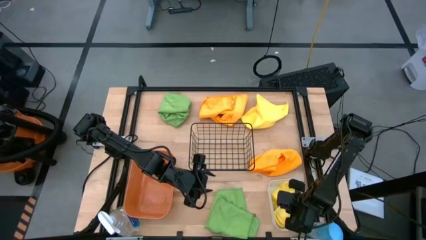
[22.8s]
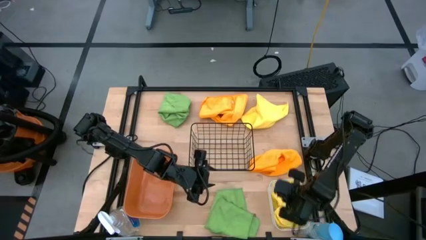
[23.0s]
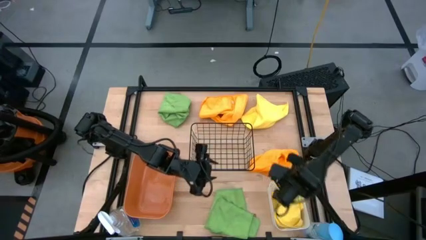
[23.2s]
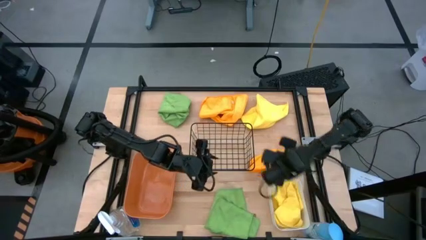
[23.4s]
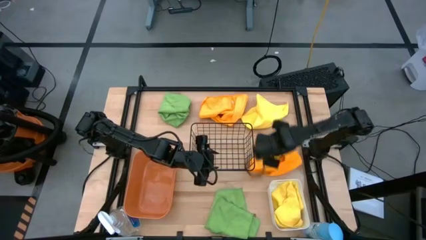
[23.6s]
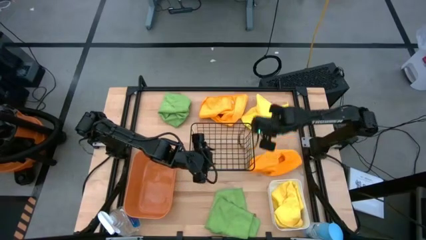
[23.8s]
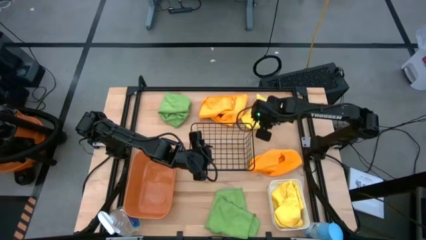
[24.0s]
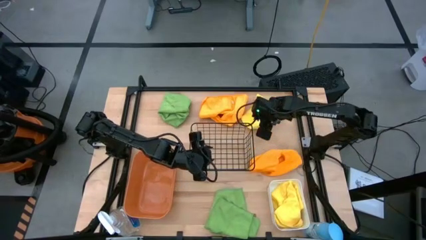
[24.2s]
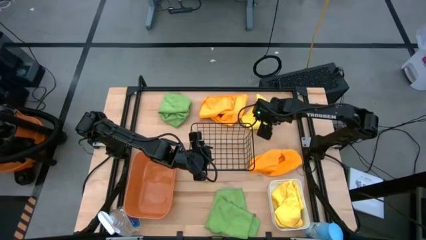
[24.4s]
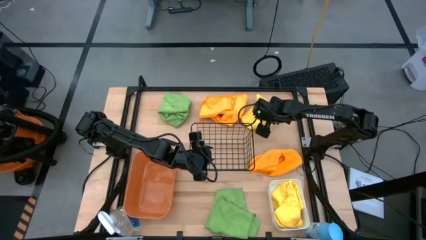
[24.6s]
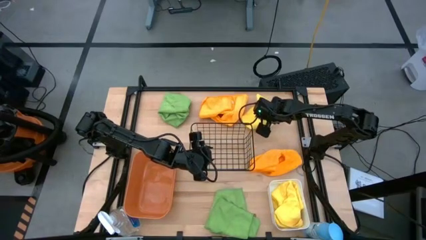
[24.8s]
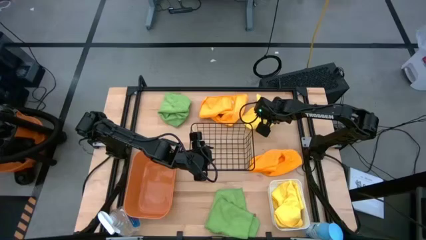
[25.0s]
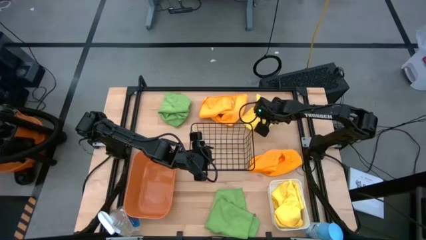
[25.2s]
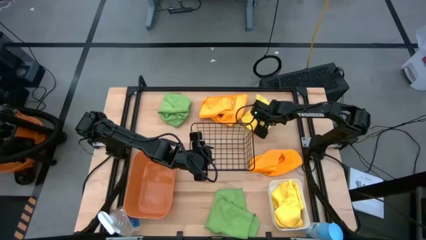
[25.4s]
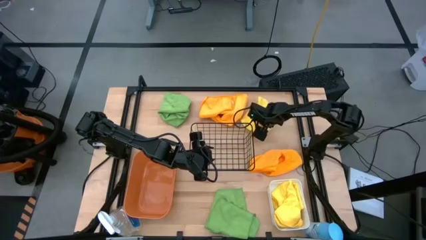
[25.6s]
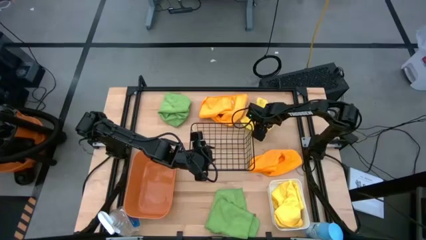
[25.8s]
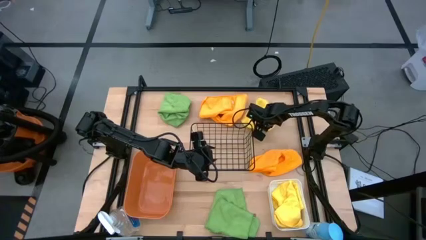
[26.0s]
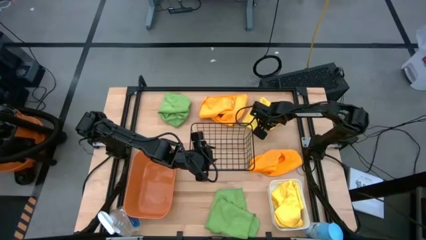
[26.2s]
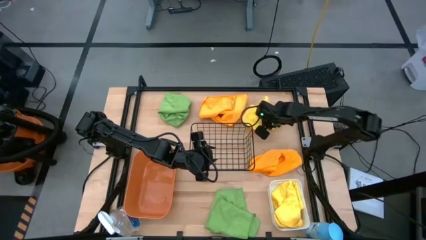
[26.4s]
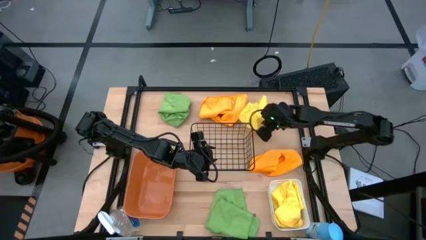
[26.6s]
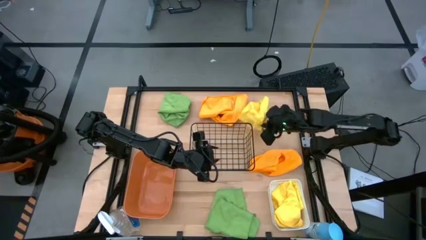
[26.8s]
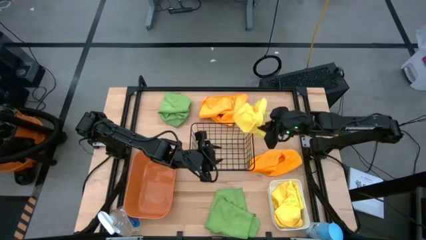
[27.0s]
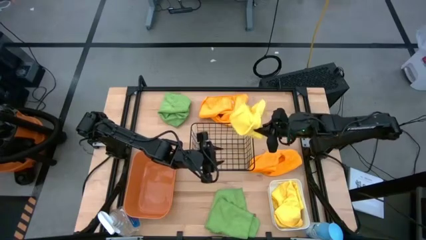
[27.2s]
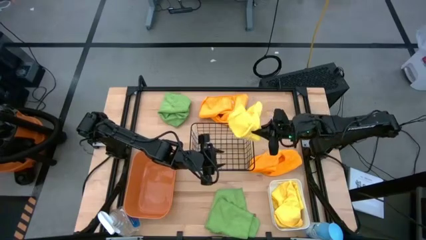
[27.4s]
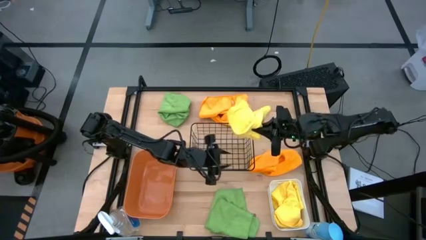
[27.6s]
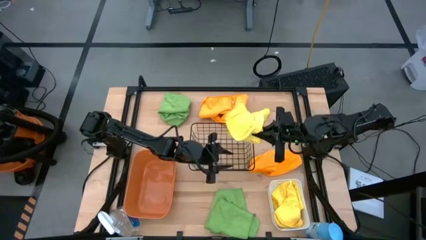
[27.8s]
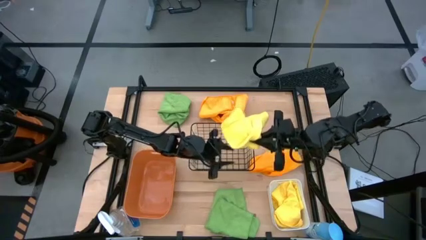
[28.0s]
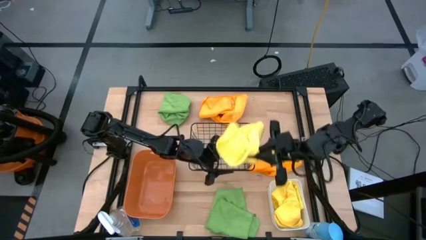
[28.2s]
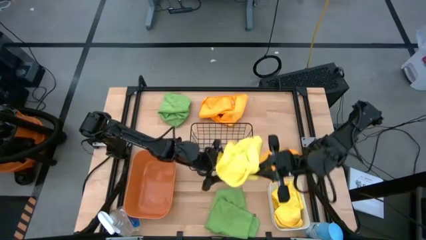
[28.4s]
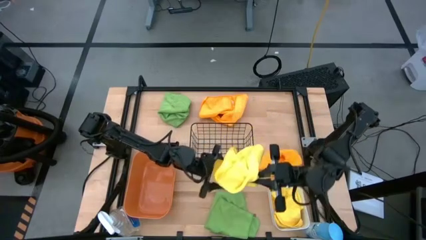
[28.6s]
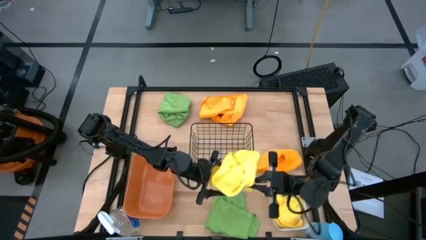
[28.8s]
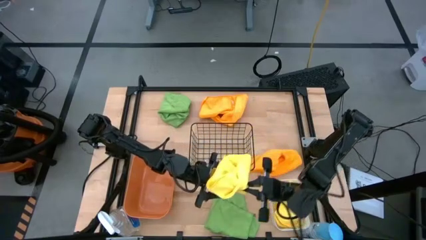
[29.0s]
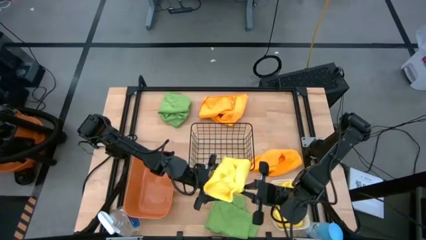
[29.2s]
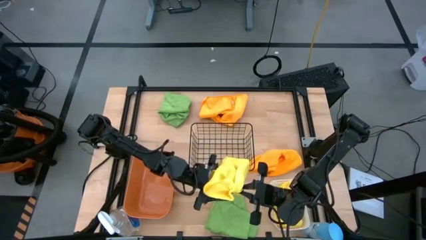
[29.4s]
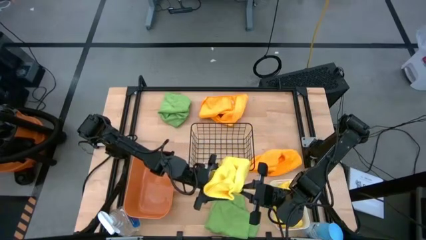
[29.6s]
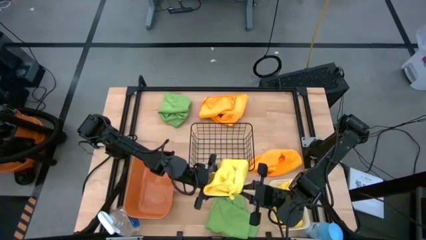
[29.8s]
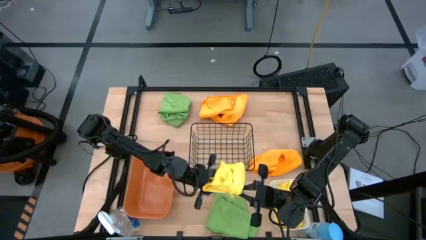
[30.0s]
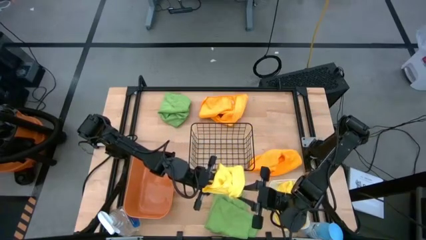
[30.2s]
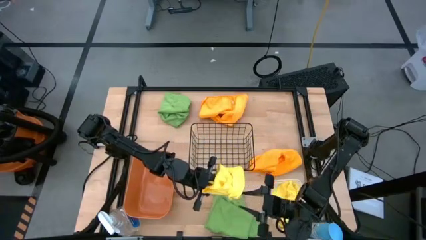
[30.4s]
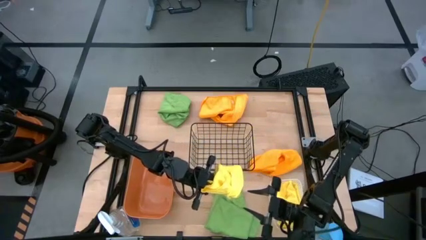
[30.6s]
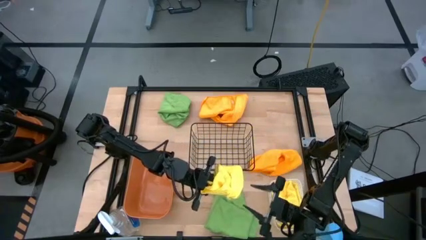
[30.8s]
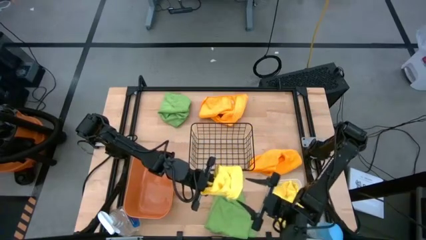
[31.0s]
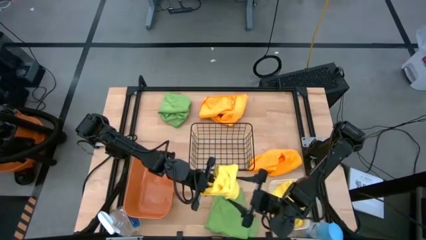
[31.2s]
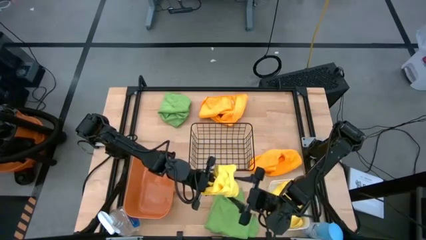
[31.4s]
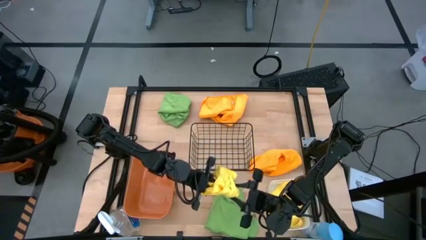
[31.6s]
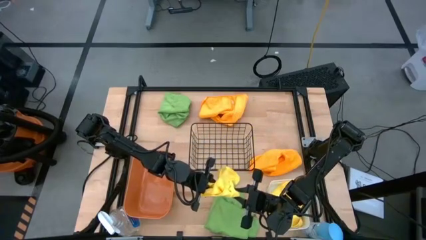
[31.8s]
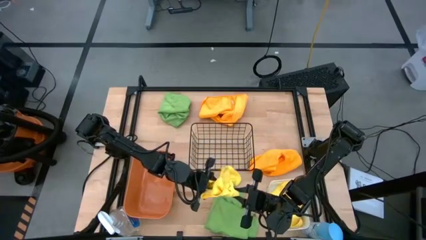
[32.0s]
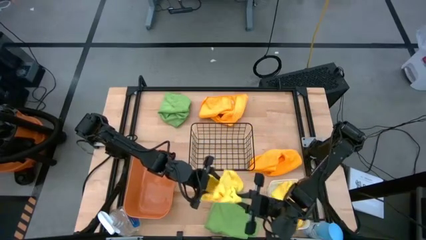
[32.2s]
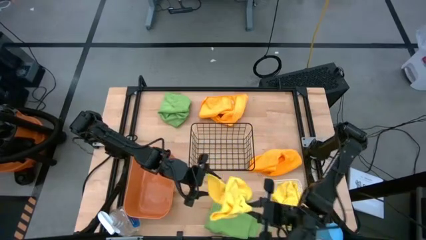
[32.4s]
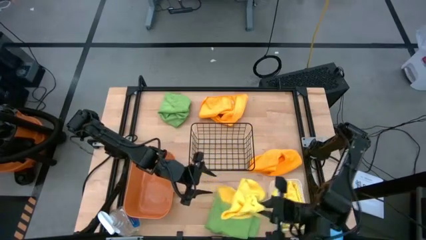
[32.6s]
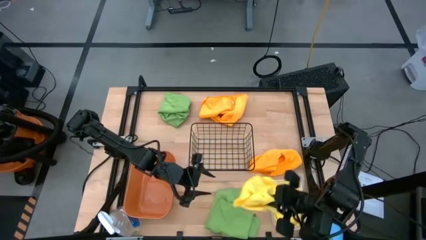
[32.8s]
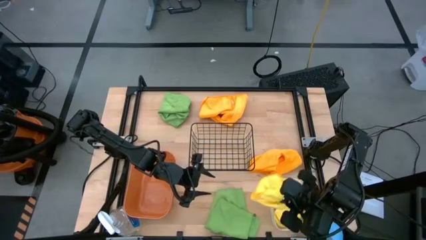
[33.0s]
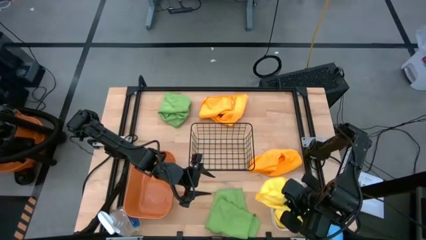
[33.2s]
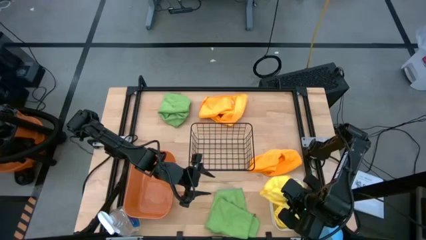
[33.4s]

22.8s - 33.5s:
Task: Sort microfiber towel by color & place in baskets
Put the yellow microfiber cloth into the white bin

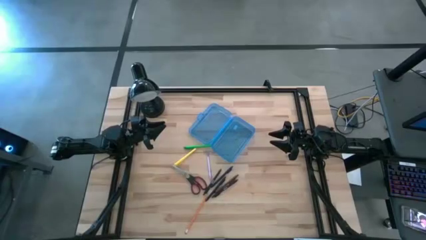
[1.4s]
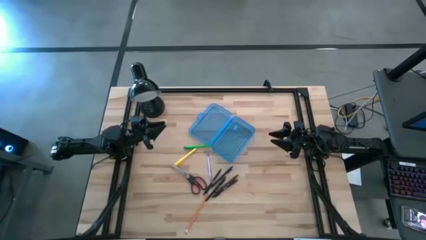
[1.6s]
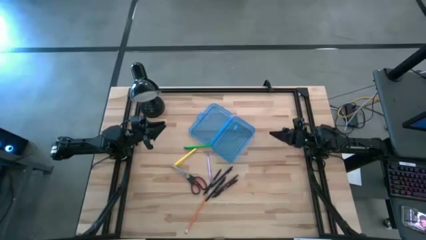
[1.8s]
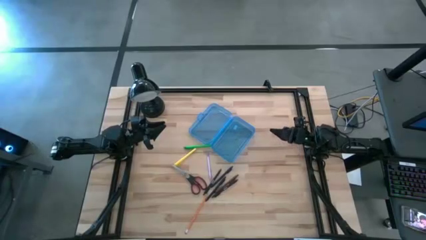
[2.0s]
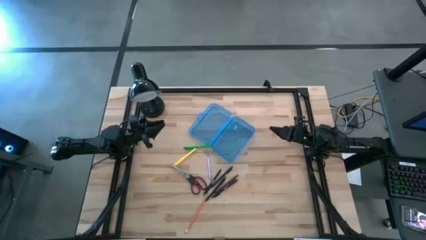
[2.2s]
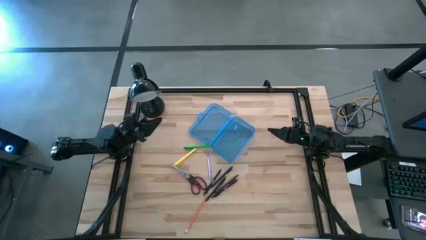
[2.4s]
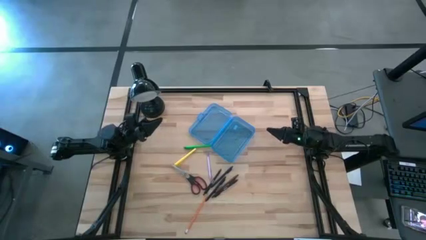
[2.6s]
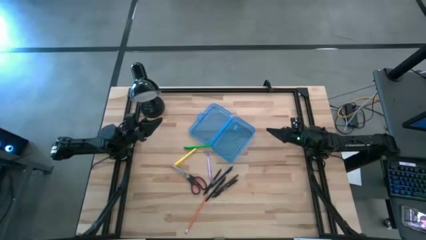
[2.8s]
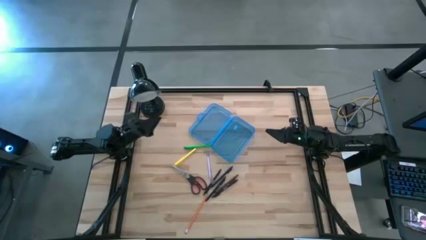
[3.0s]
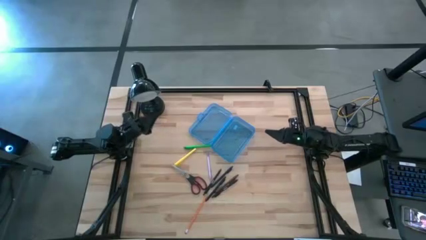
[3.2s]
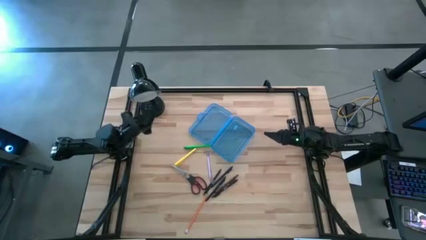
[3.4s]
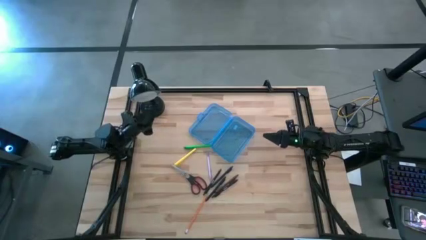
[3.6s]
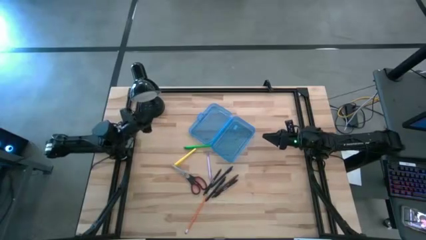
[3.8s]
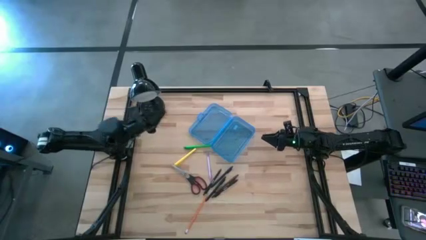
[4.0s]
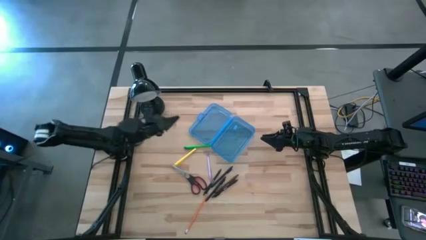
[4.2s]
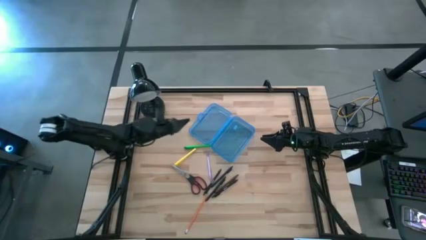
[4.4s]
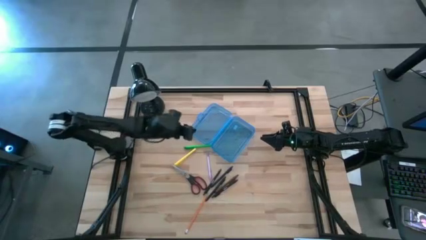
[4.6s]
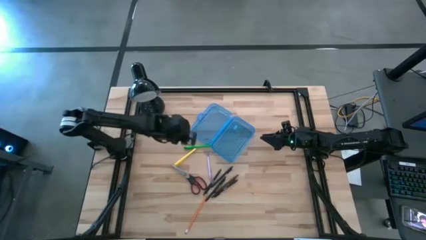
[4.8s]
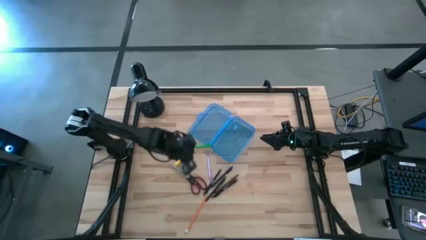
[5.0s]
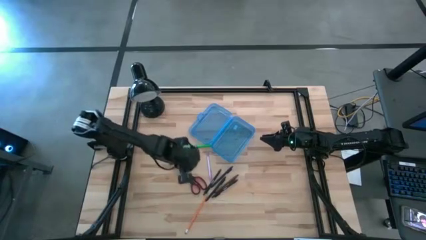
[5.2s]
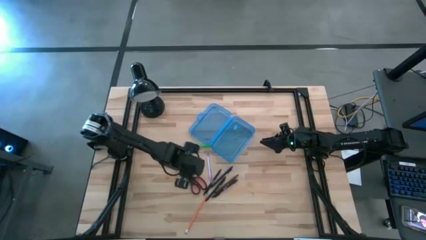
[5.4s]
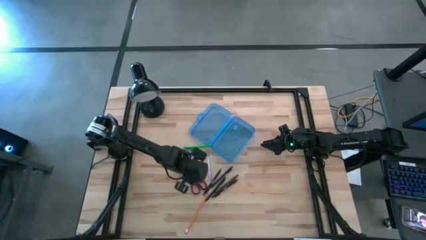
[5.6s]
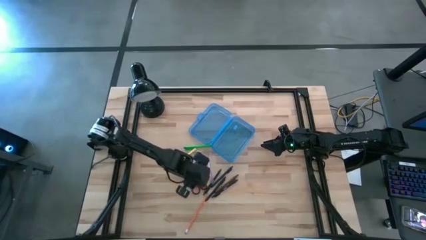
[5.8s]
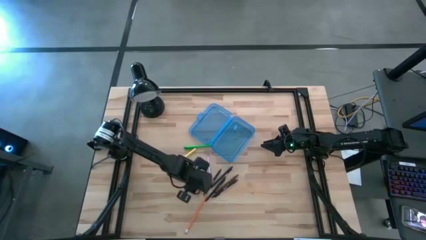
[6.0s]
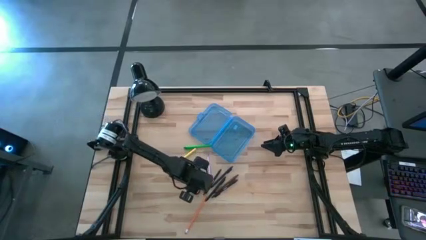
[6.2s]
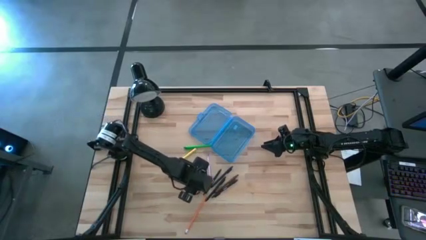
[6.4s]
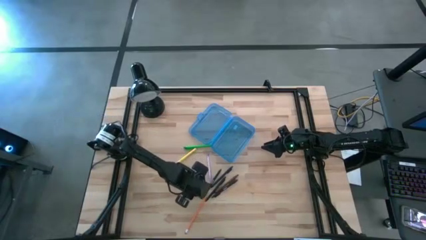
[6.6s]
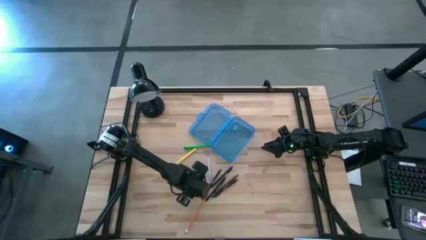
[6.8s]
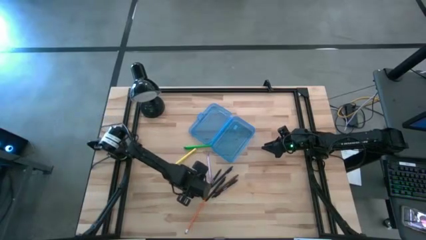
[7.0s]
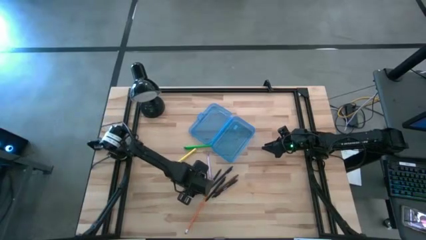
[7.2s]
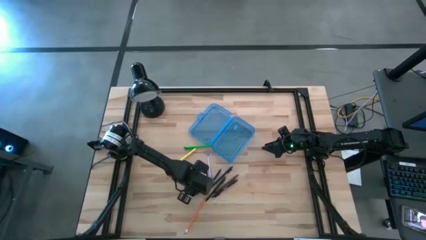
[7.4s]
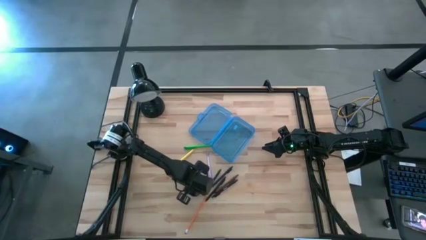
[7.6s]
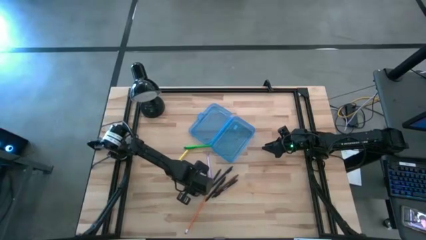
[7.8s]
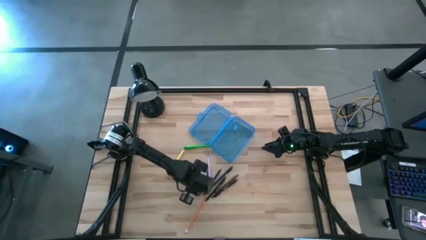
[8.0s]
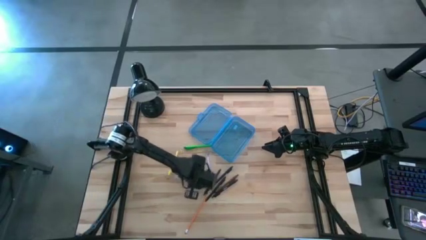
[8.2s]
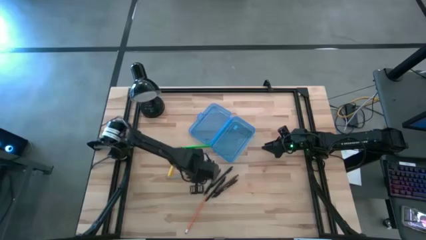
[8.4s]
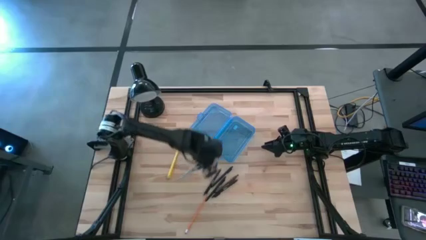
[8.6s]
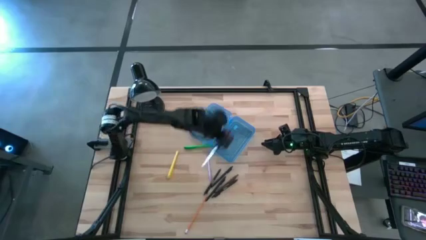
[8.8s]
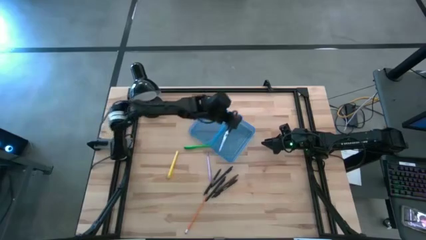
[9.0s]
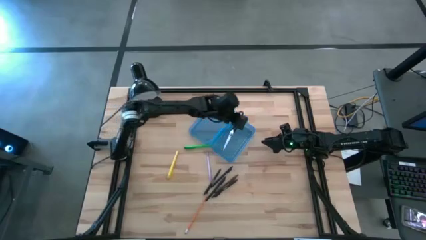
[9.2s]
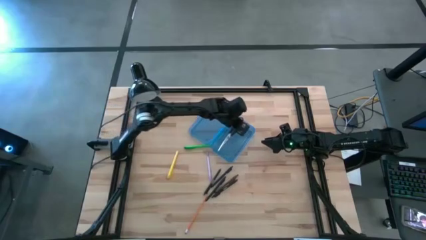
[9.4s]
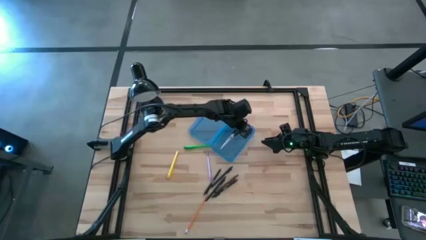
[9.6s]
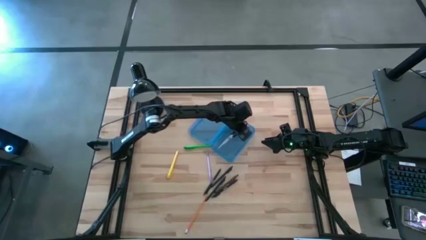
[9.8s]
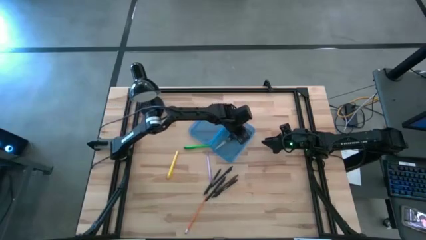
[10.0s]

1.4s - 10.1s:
Task: Pick & place school supplies into a supply box
Put the the scissors into the supply box
